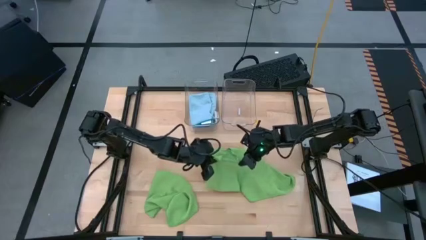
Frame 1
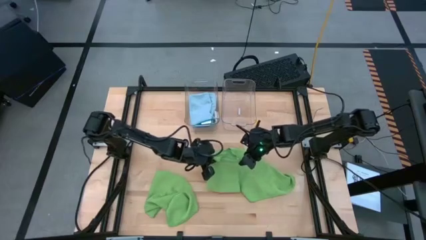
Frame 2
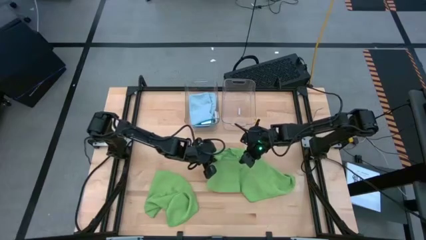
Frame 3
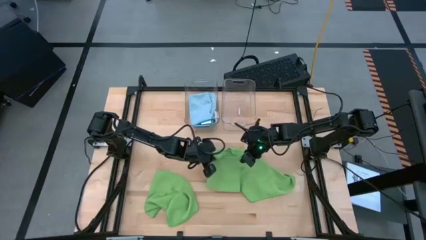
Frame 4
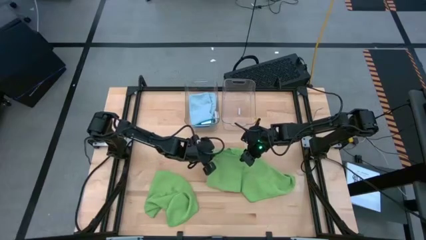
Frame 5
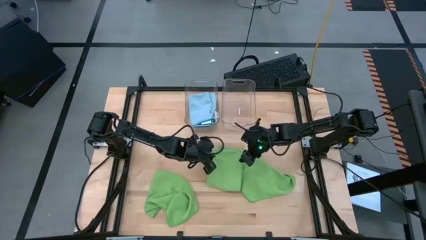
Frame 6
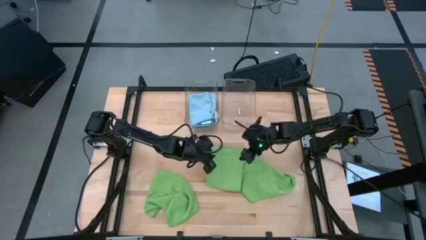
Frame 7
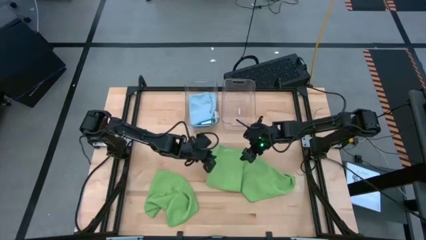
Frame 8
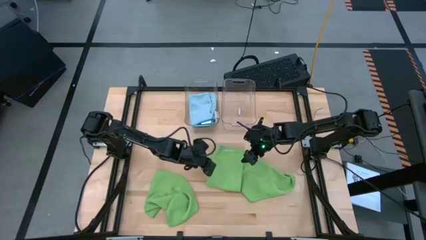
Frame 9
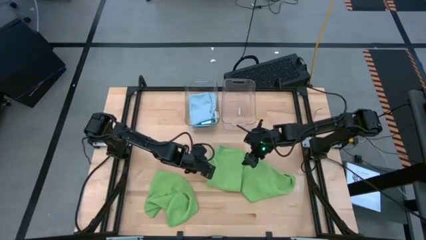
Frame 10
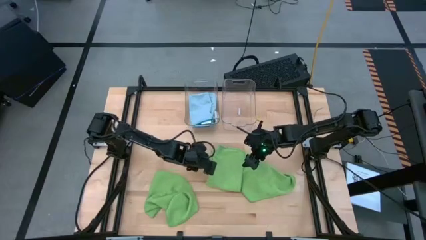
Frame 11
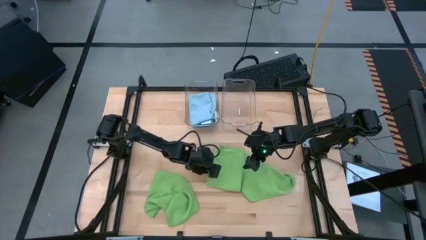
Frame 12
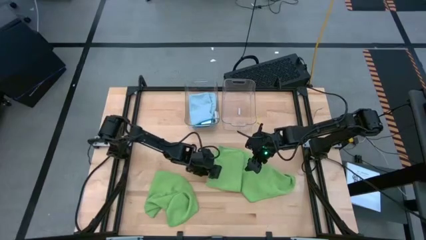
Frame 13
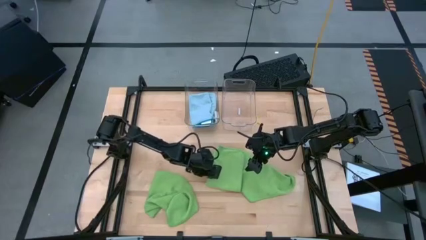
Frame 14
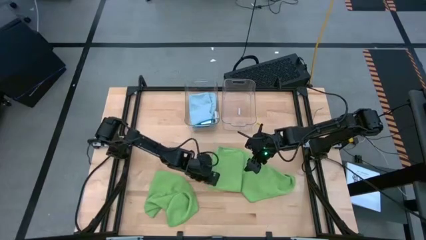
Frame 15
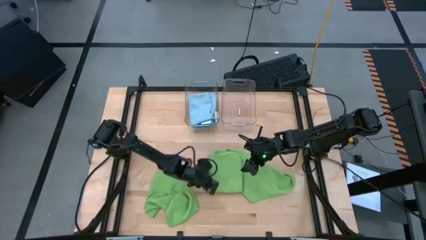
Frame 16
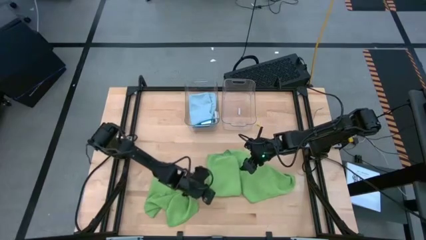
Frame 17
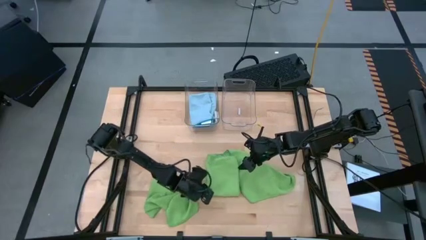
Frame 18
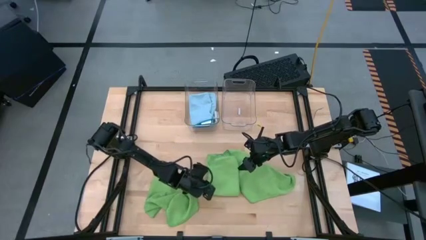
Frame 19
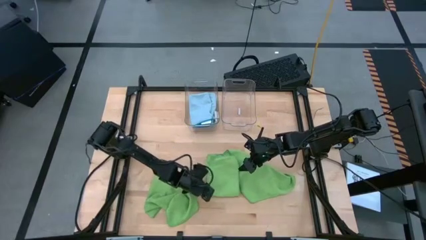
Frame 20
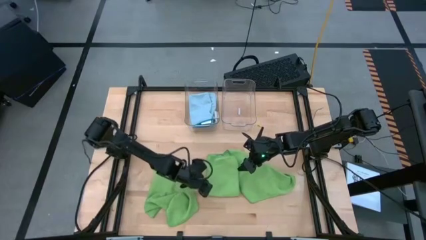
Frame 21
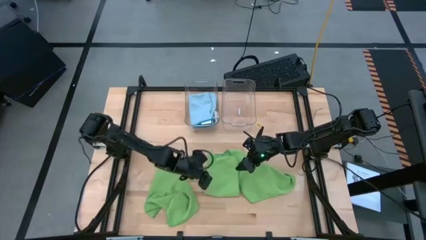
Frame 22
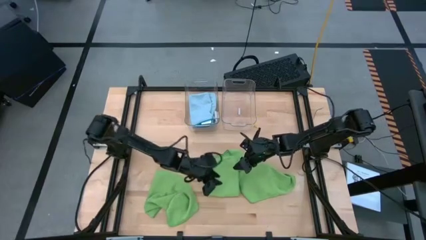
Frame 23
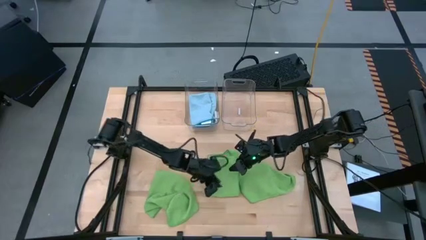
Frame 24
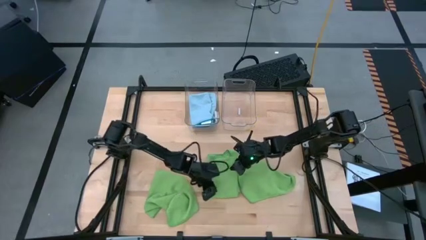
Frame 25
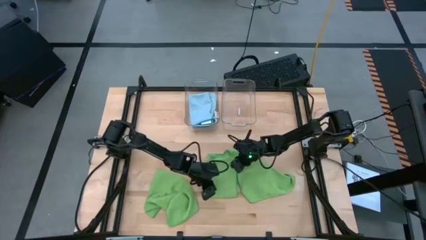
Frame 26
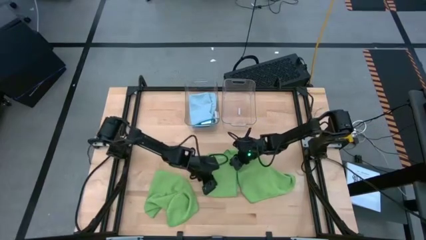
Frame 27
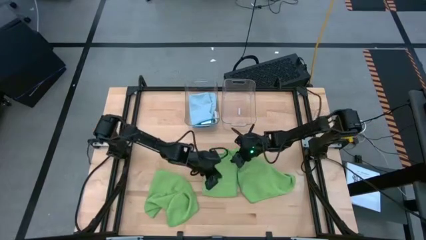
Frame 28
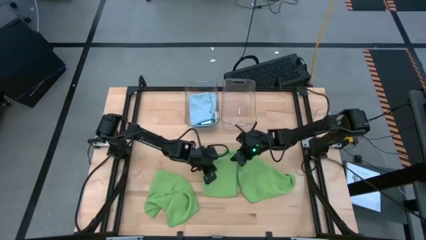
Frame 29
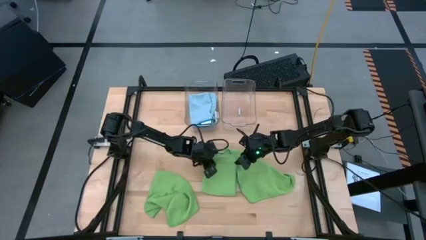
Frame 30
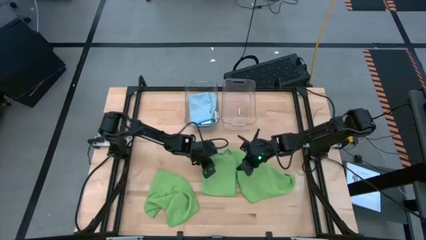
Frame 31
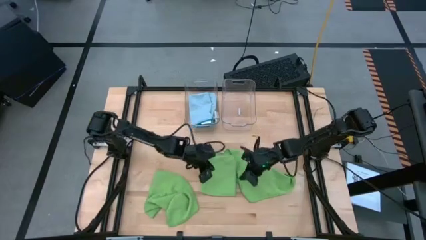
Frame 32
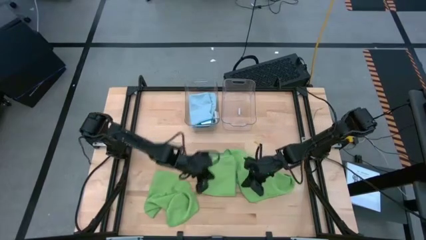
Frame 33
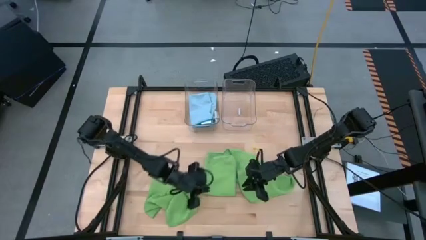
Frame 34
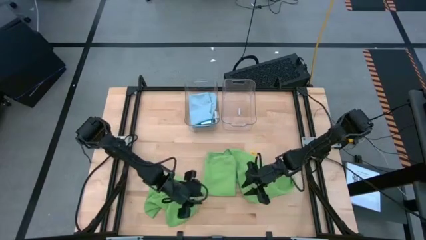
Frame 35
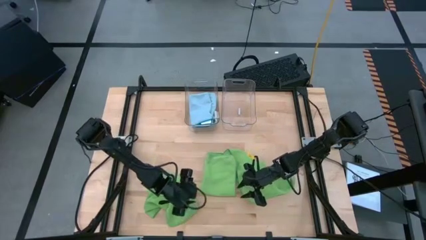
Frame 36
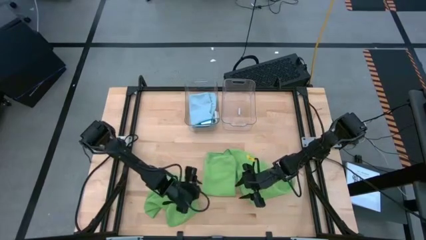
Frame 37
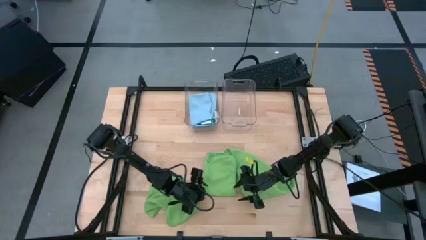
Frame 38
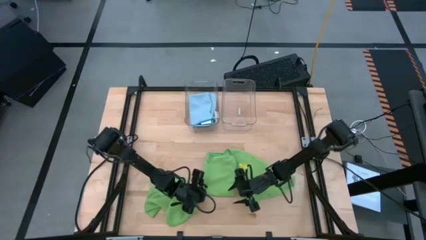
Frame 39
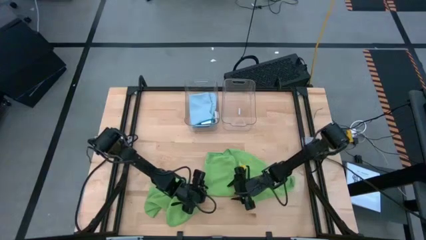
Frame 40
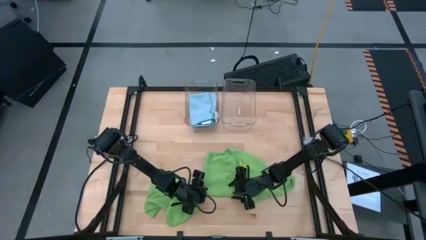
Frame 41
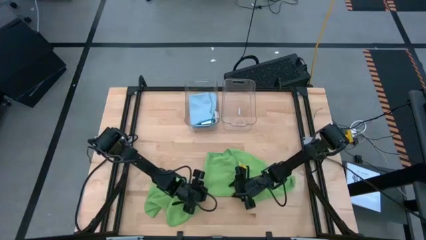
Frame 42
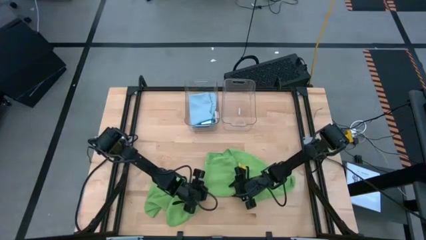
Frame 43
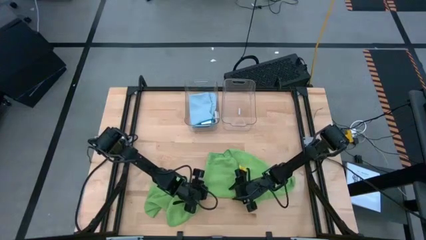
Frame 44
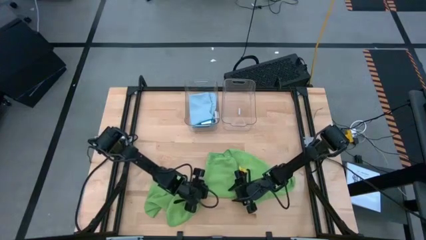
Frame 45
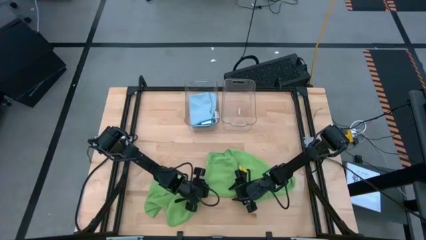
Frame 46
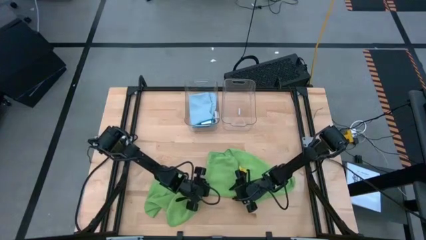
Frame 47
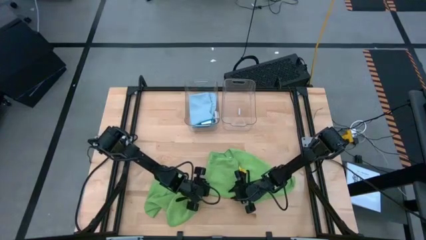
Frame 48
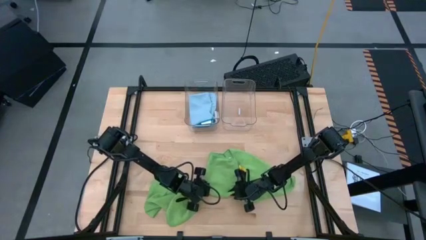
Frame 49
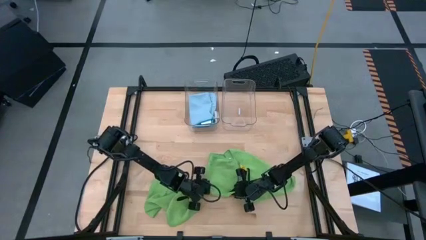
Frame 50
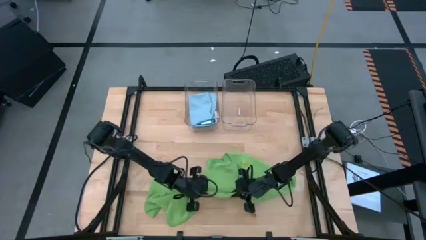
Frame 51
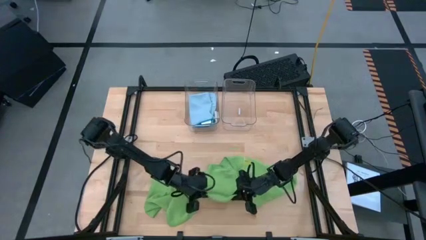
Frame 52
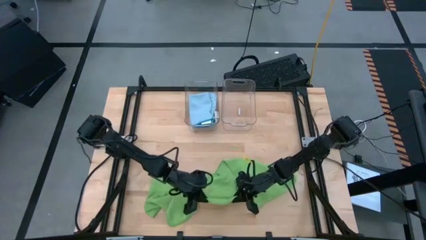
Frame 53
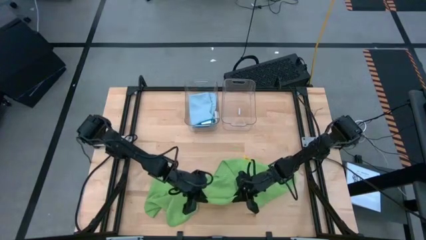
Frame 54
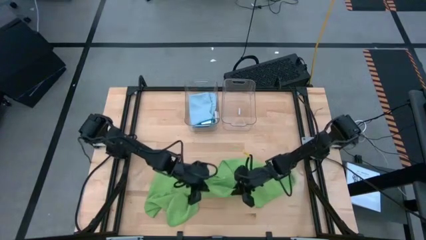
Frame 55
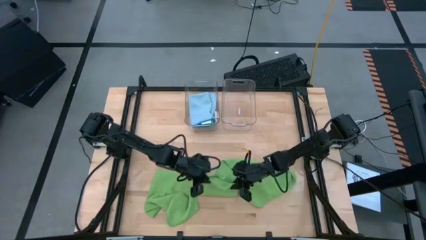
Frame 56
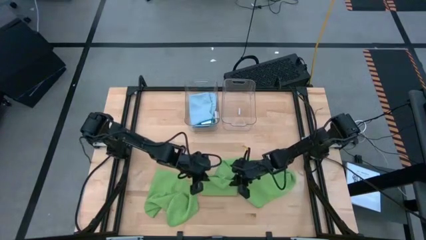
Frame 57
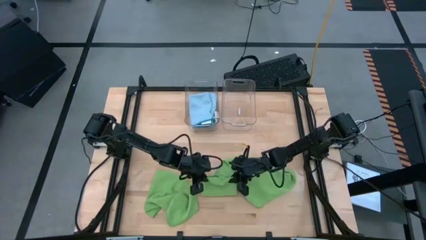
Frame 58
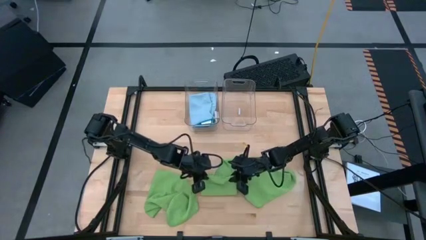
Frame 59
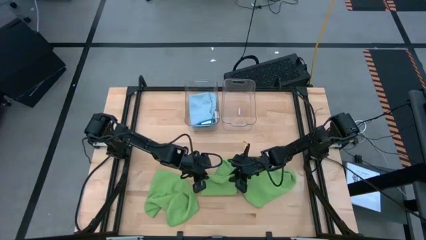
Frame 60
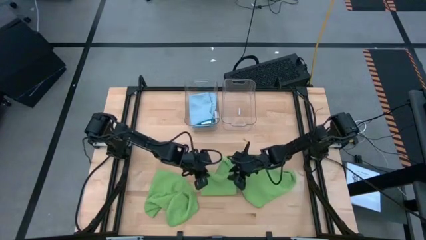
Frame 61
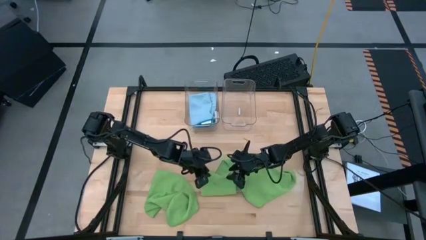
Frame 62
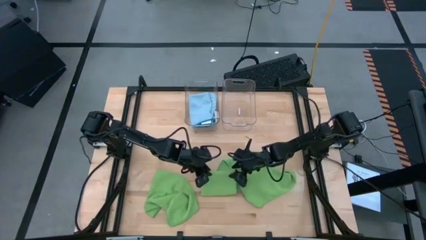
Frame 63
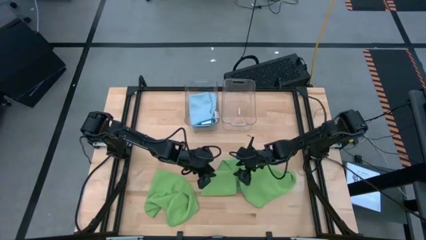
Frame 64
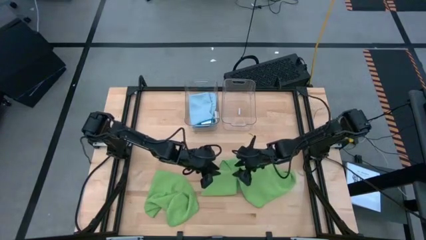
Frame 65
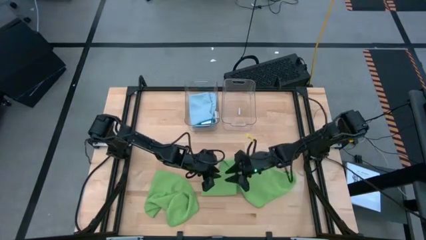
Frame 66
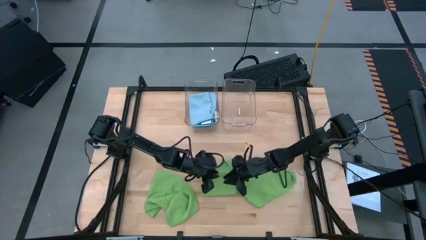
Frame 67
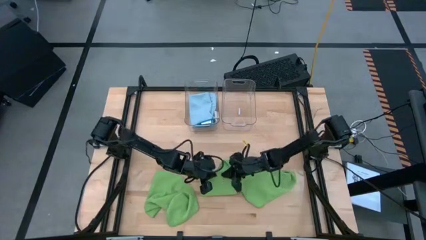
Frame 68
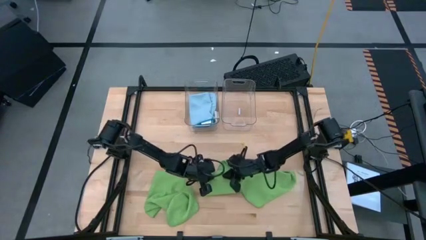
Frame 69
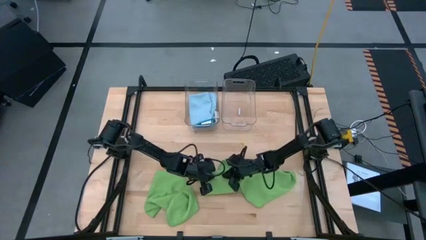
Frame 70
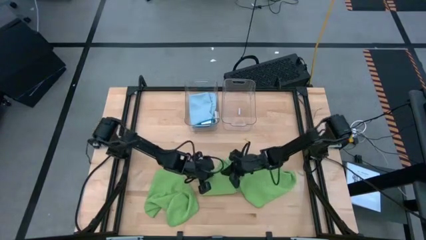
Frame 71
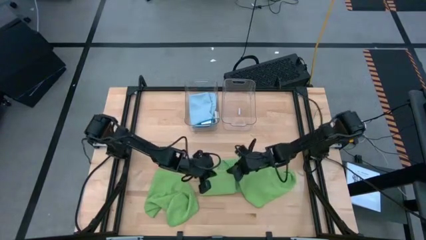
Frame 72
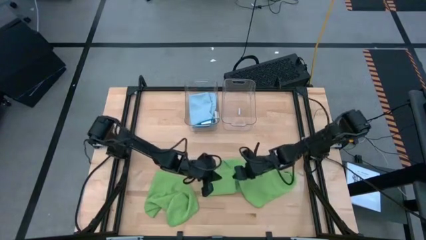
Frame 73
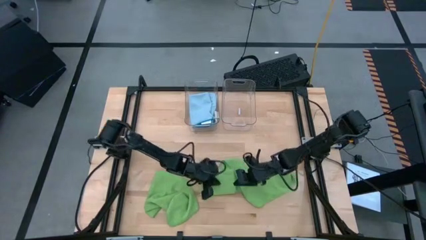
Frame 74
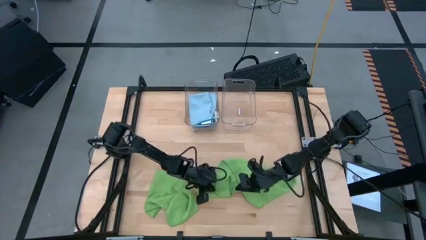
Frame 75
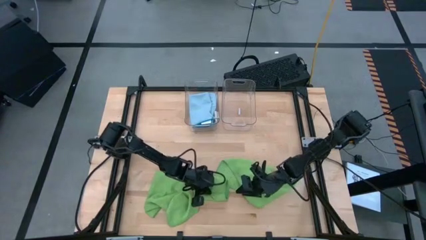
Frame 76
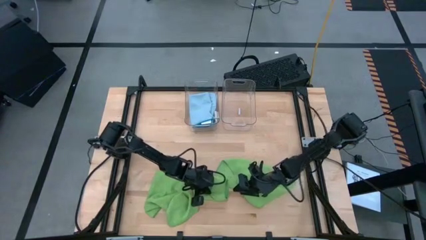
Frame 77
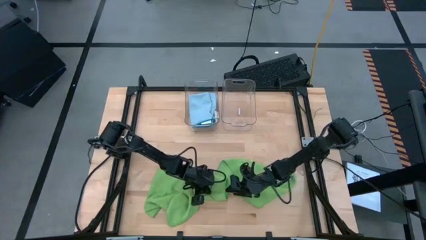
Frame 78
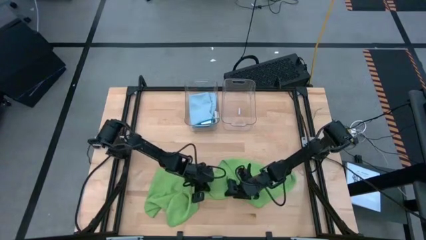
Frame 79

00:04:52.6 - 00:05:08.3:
Task: Fold microfiber towels
Fold the top left green microfiber towel
